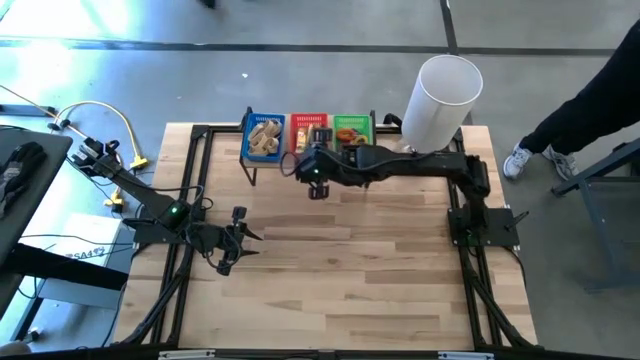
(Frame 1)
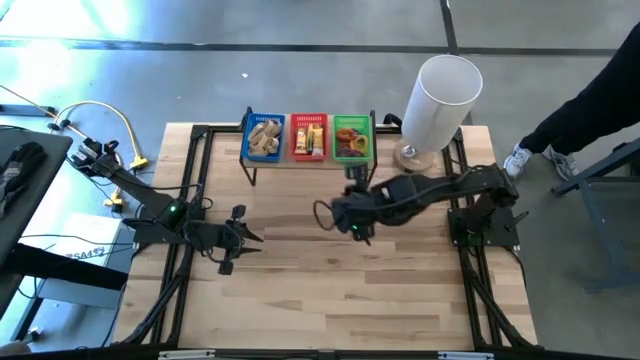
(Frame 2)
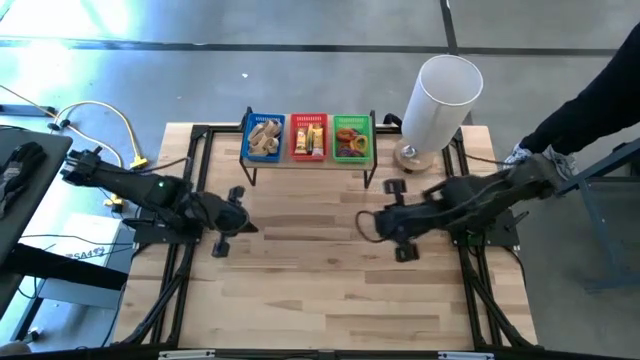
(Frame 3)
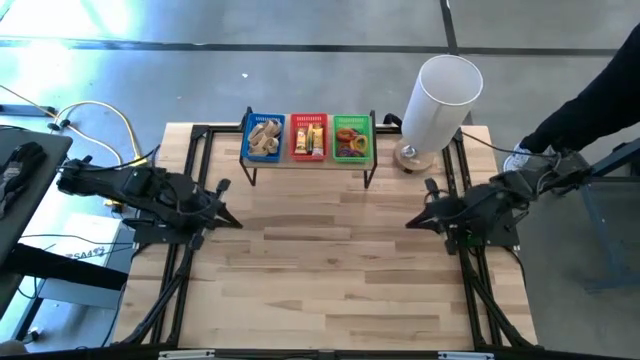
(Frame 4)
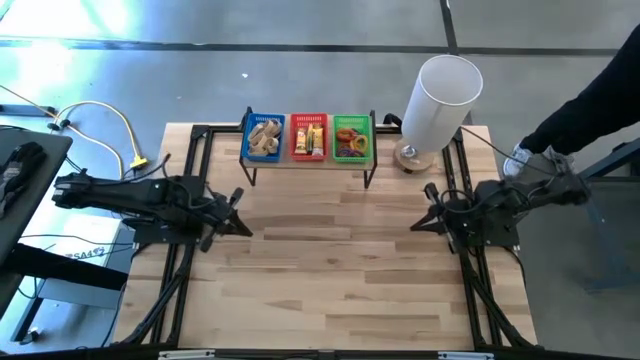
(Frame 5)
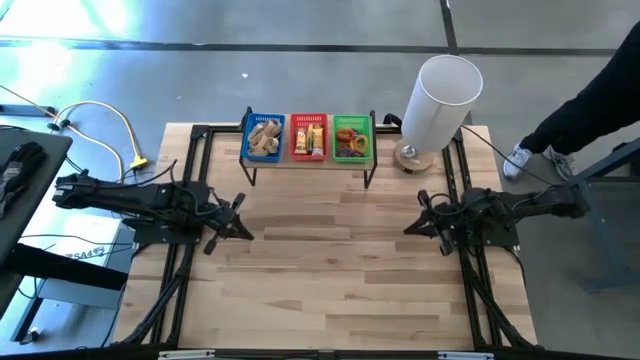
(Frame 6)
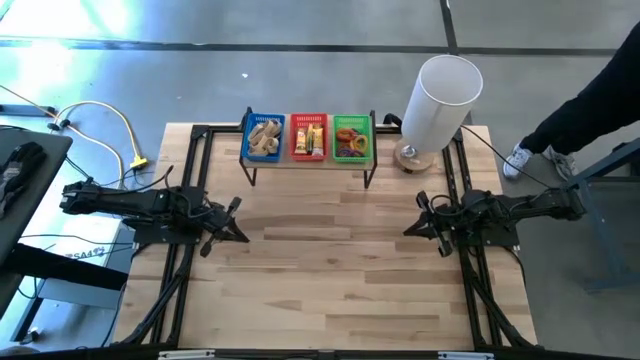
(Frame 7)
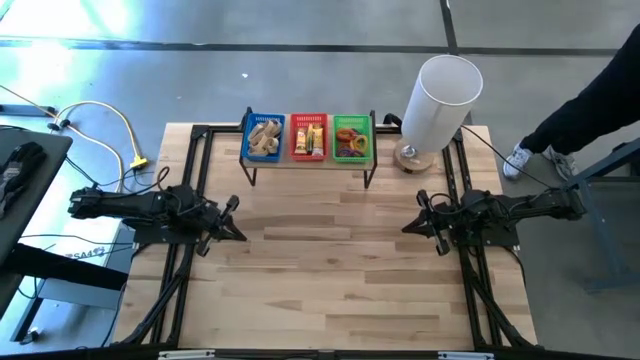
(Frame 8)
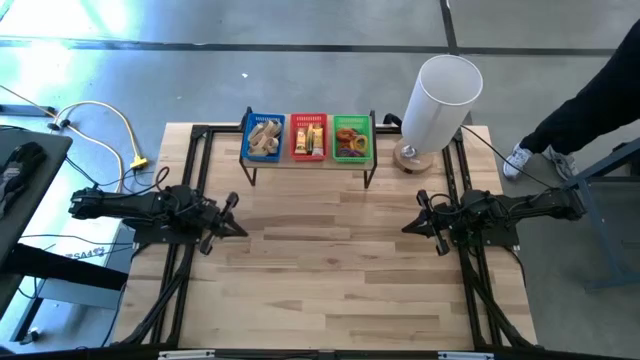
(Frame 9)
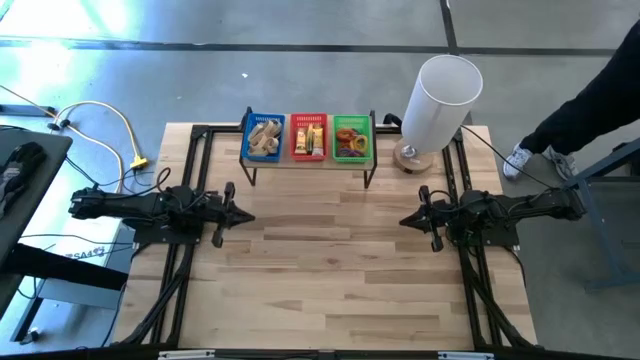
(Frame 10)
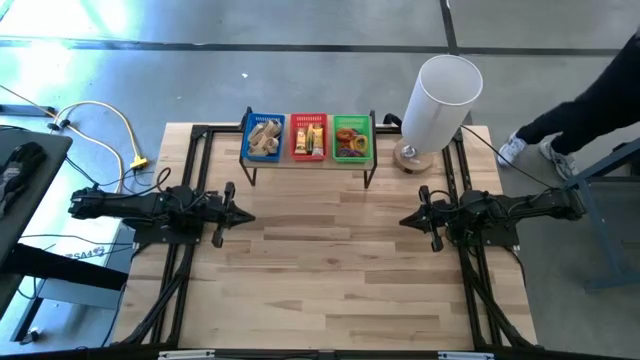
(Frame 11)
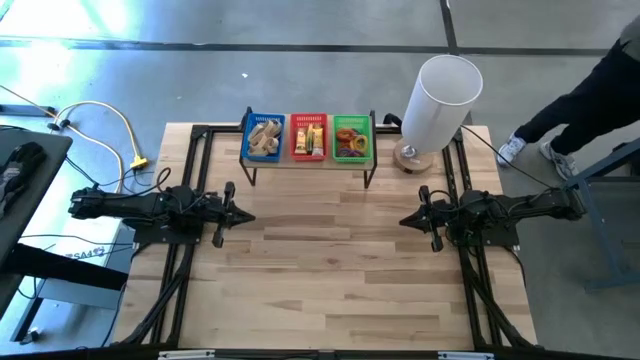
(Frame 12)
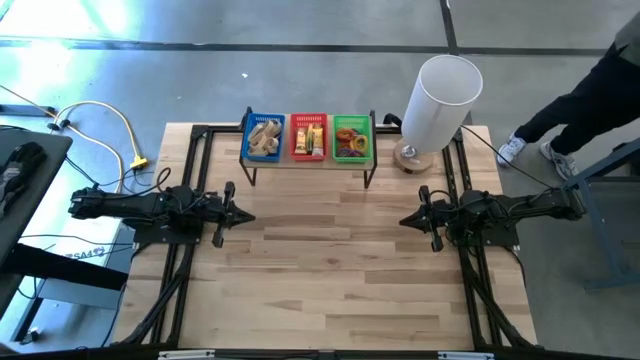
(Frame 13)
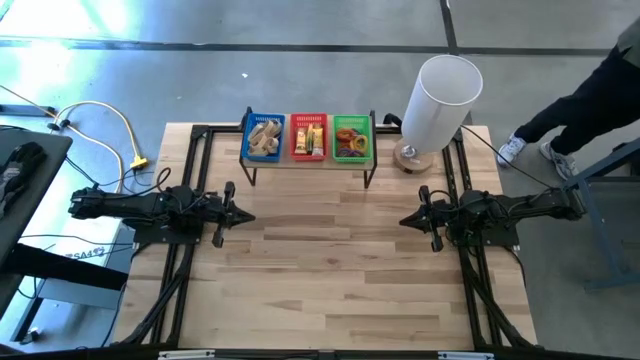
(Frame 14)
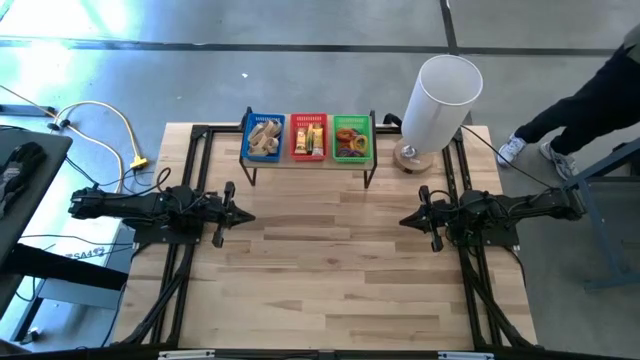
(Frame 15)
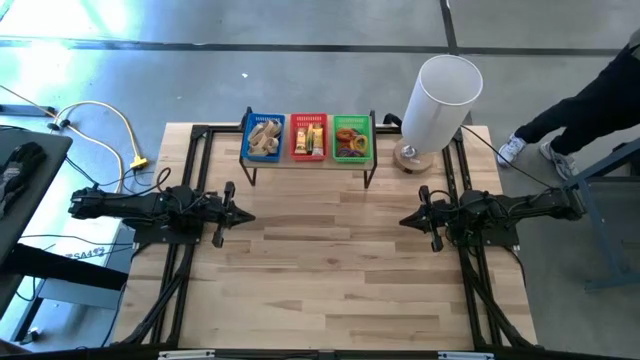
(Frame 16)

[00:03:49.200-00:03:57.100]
Task: Pick & Place Office Desk Supplies
Return to Home Position

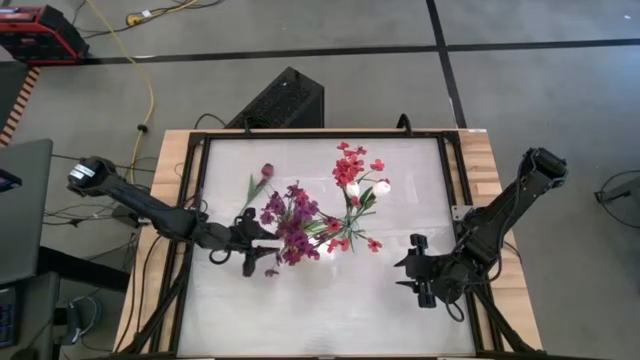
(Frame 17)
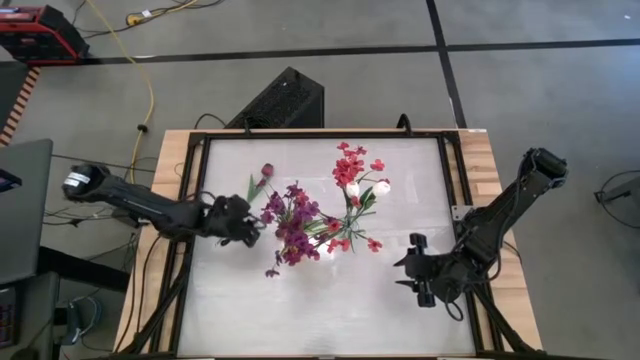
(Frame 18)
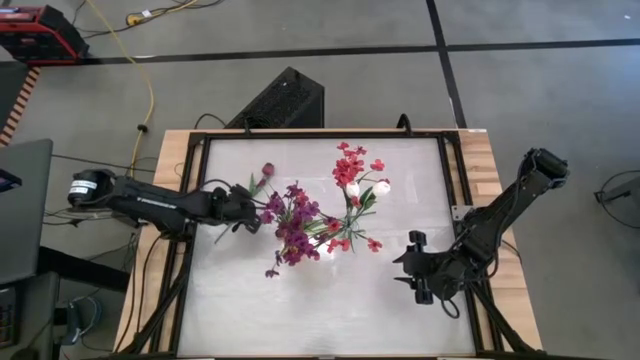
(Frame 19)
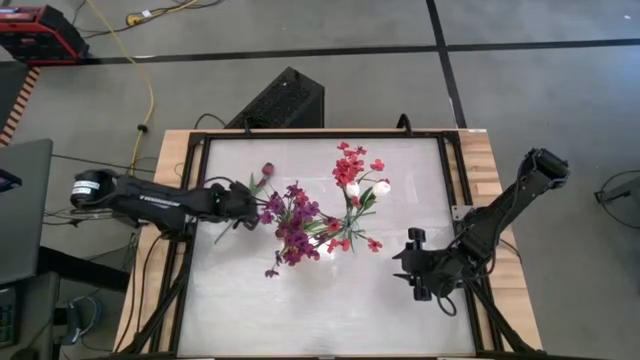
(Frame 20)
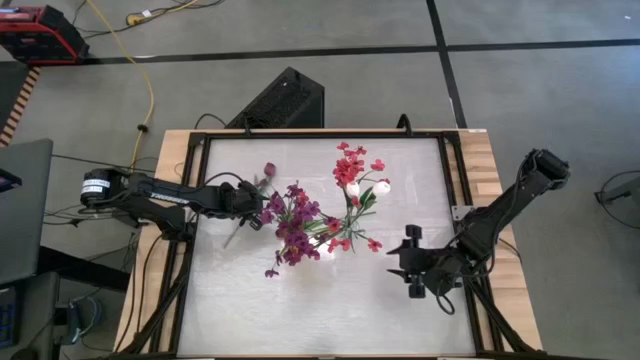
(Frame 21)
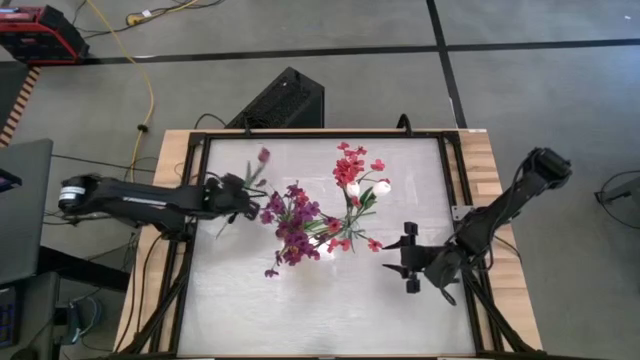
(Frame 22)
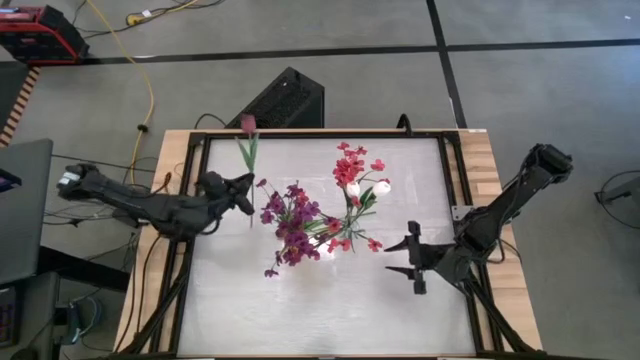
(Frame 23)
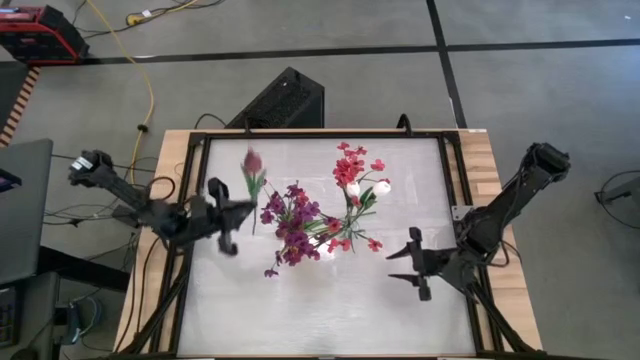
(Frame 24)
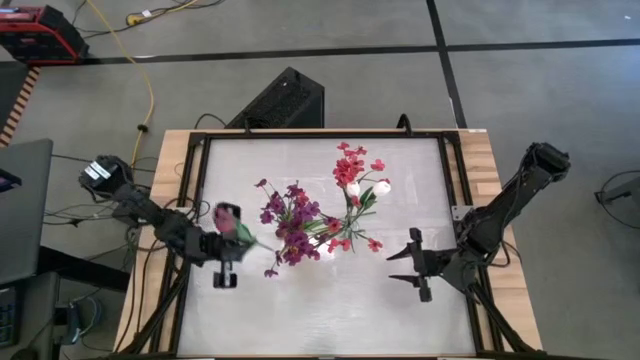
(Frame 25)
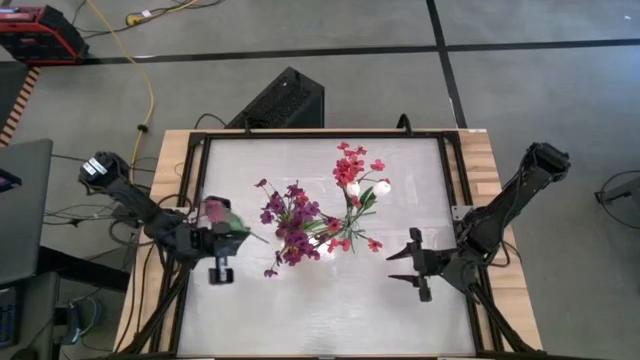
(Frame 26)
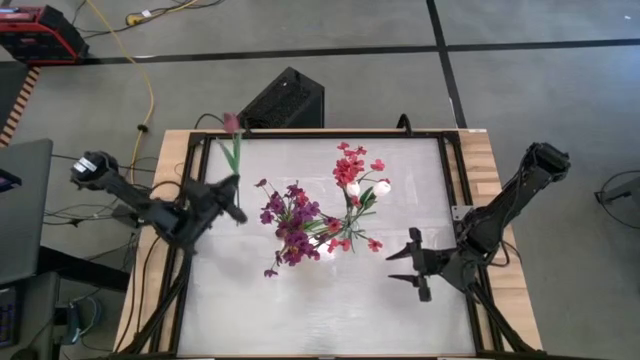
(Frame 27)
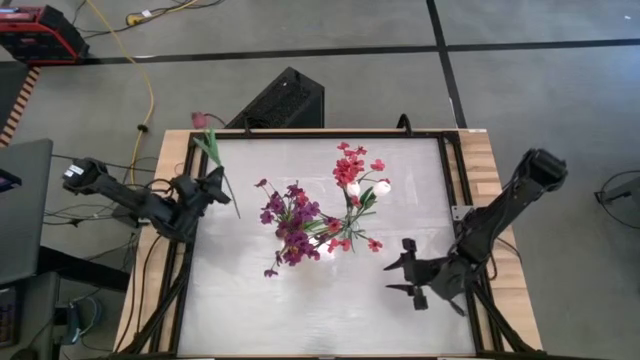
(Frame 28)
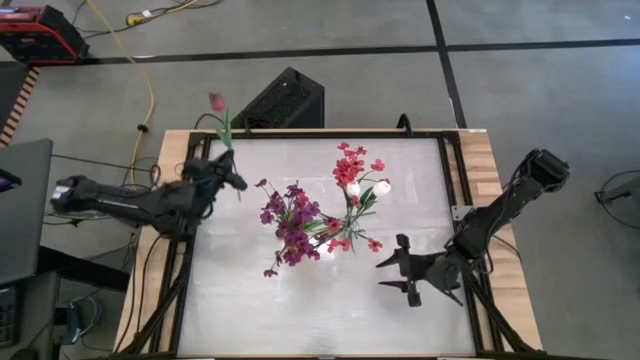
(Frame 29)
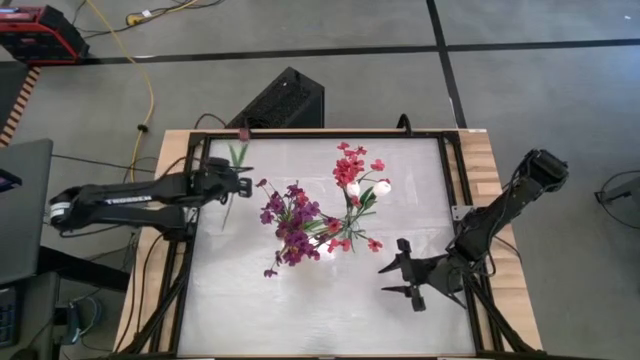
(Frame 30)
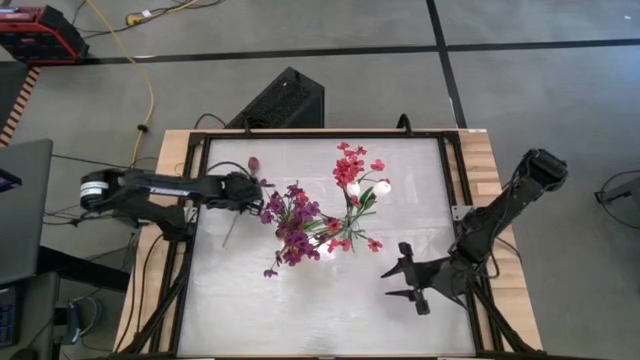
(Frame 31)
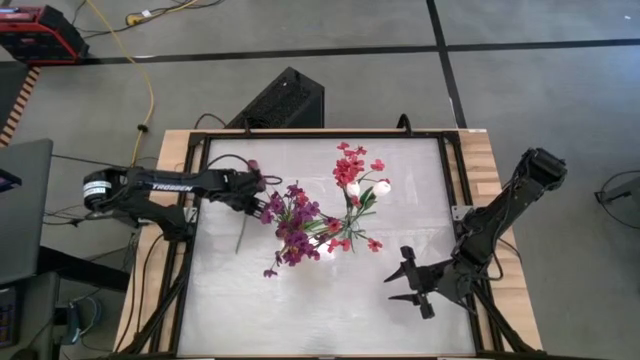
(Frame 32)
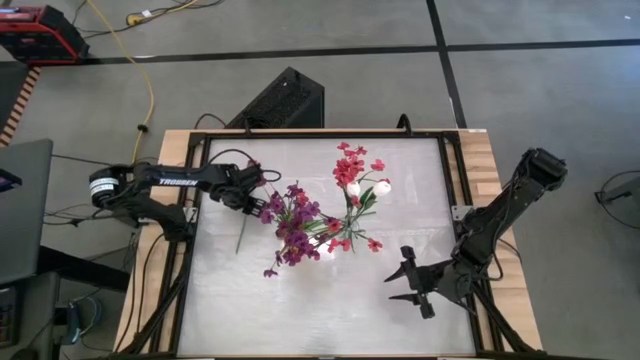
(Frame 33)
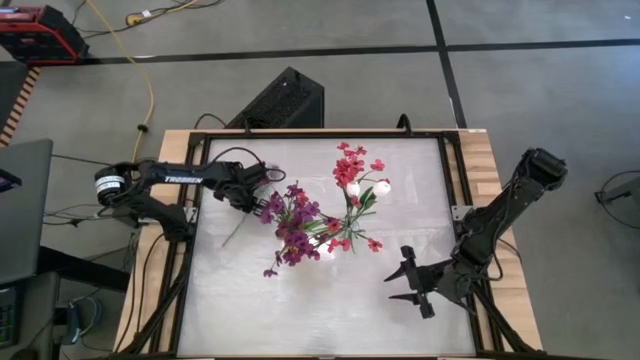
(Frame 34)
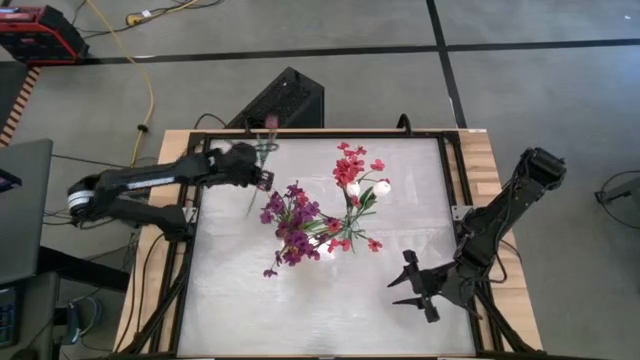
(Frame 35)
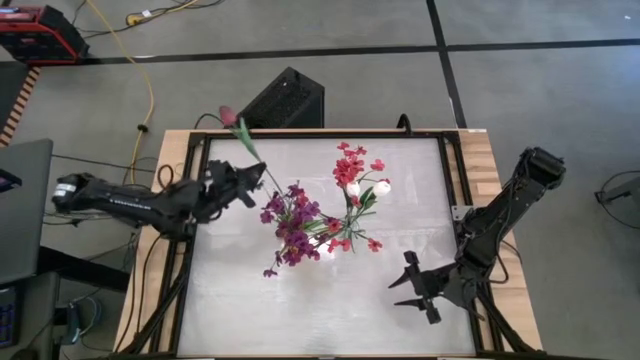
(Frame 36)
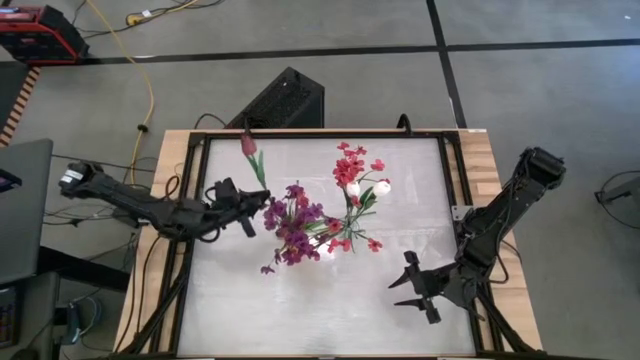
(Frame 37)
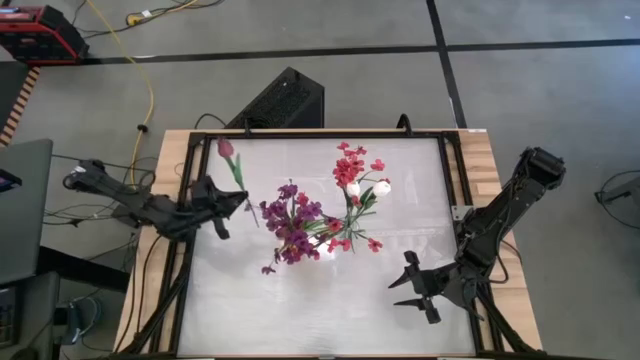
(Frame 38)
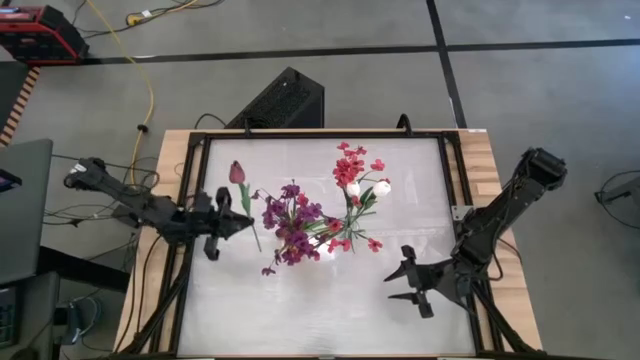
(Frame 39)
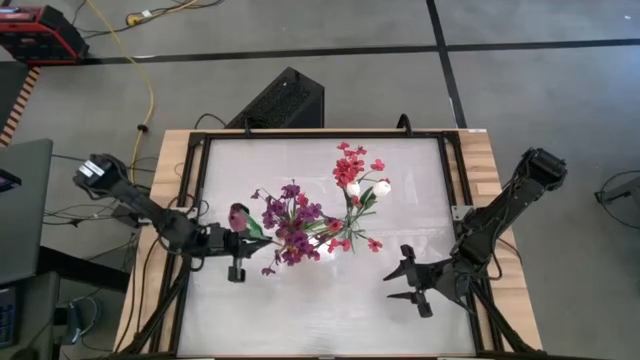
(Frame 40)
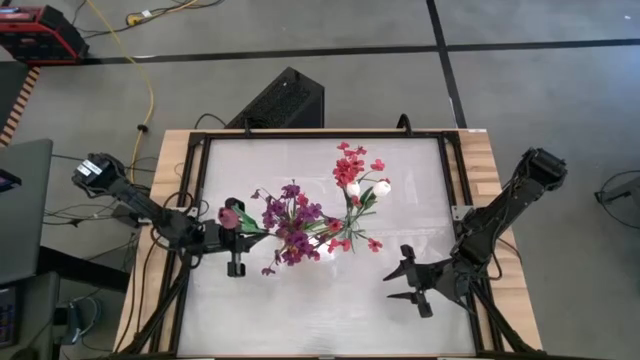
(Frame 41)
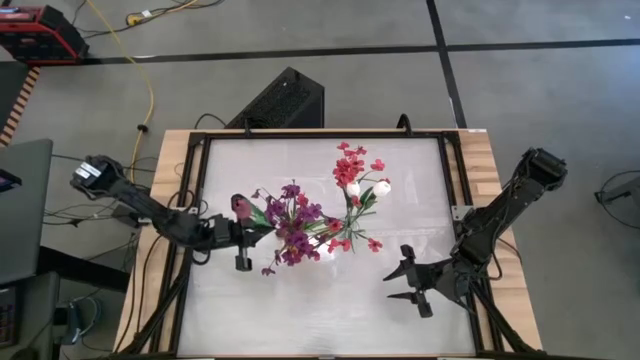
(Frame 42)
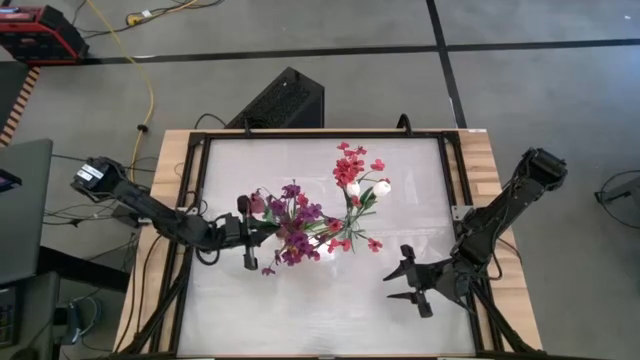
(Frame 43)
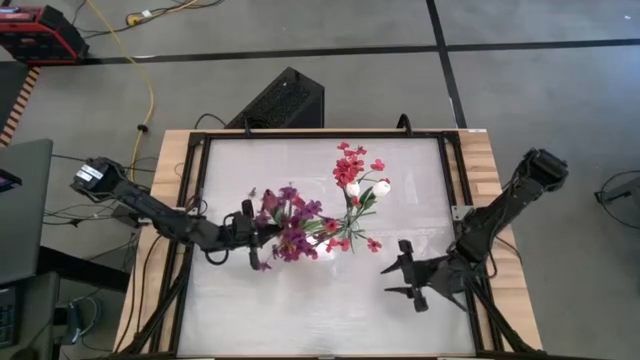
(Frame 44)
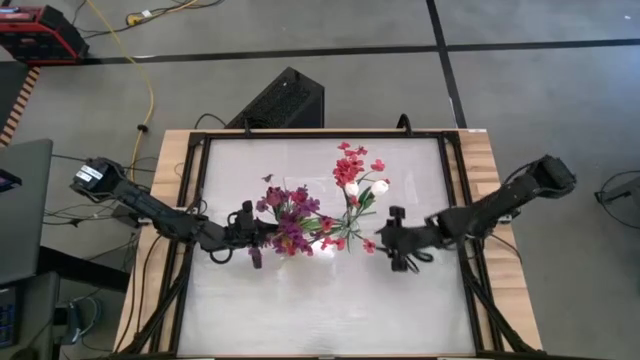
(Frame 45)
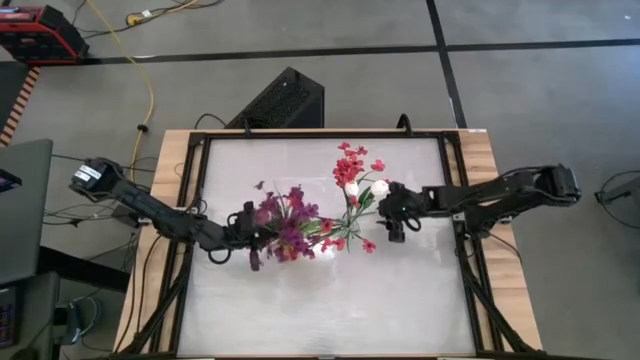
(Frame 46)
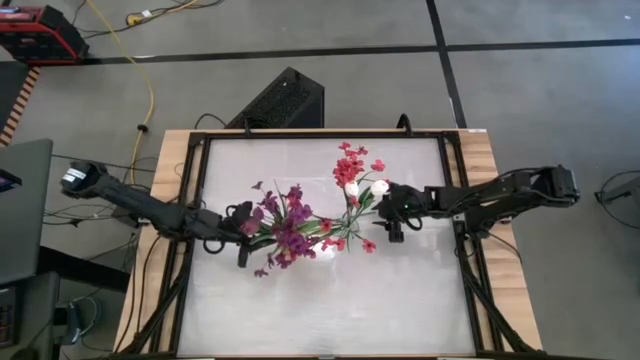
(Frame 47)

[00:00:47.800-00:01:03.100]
Task: Sort flowers into vase by color
Put the top violet tulip into the yellow vase
